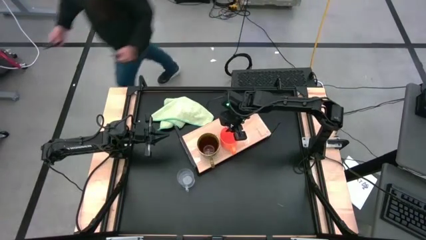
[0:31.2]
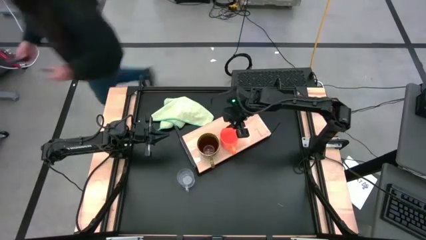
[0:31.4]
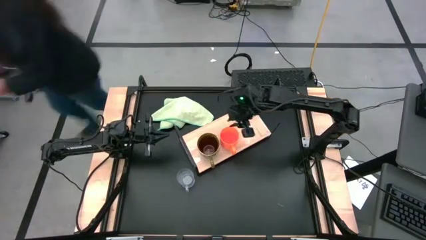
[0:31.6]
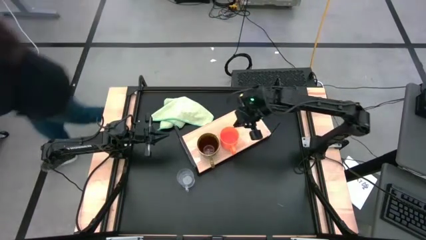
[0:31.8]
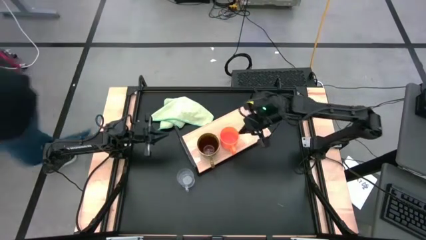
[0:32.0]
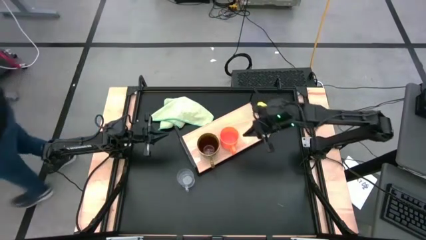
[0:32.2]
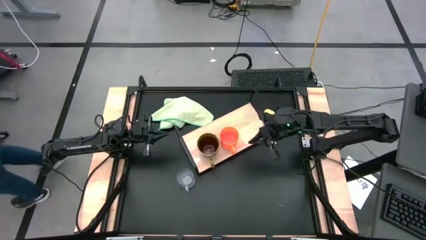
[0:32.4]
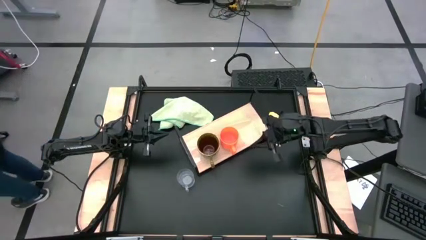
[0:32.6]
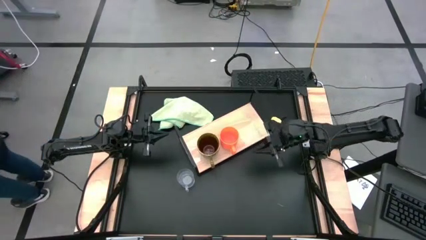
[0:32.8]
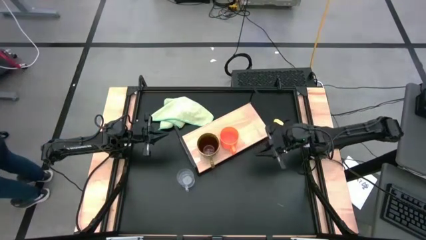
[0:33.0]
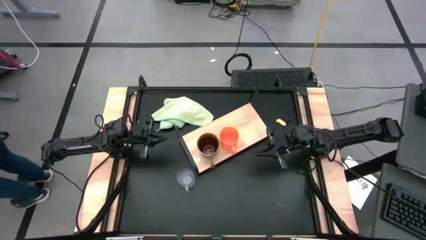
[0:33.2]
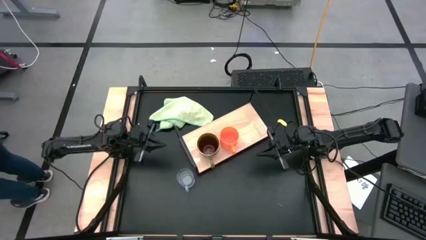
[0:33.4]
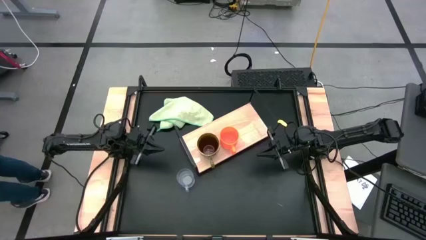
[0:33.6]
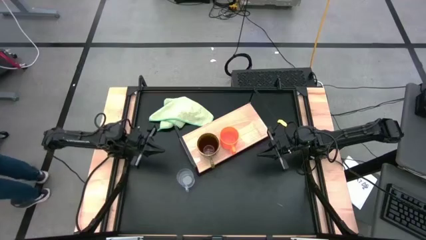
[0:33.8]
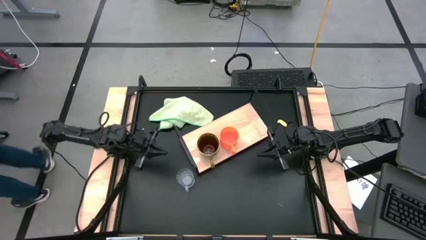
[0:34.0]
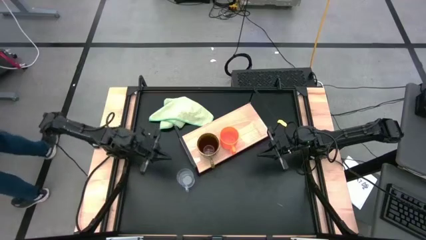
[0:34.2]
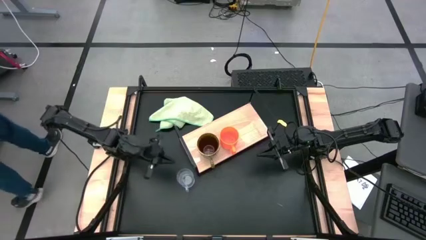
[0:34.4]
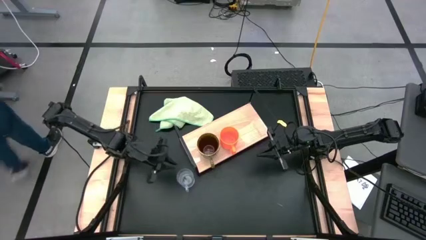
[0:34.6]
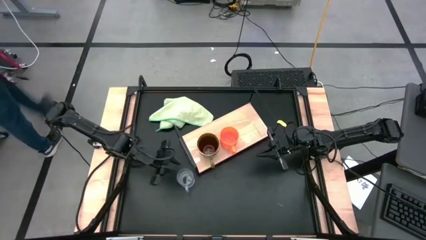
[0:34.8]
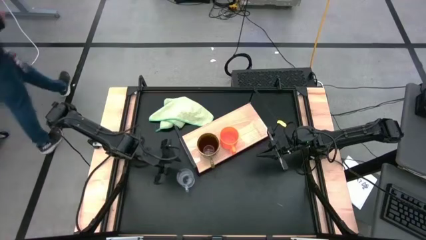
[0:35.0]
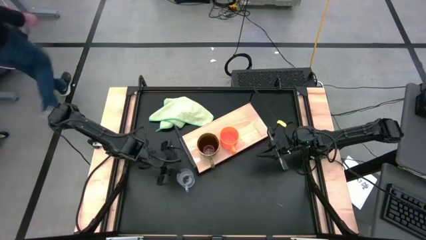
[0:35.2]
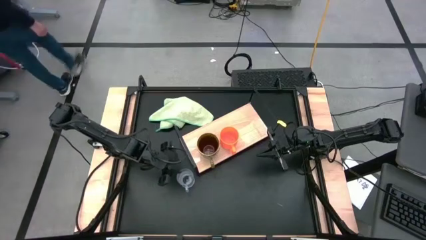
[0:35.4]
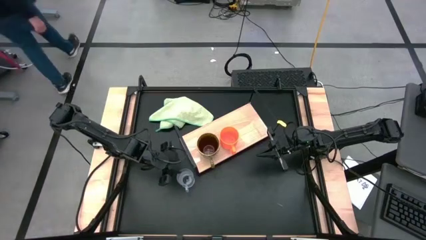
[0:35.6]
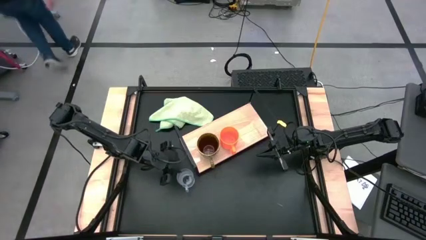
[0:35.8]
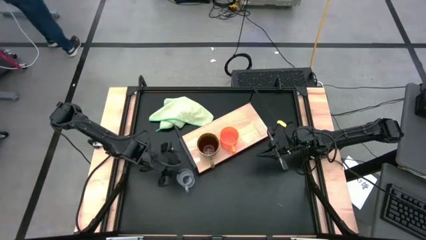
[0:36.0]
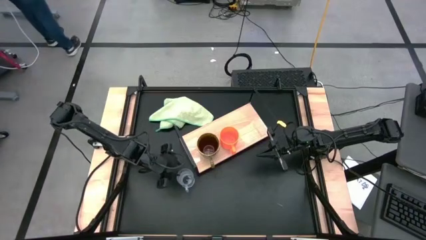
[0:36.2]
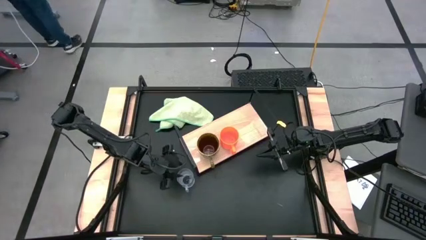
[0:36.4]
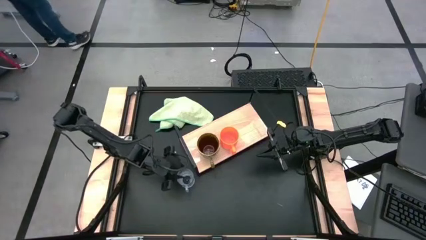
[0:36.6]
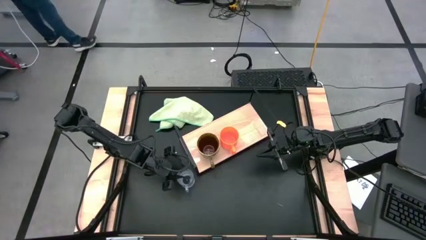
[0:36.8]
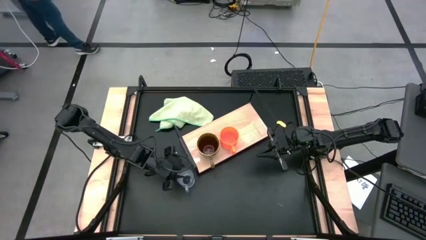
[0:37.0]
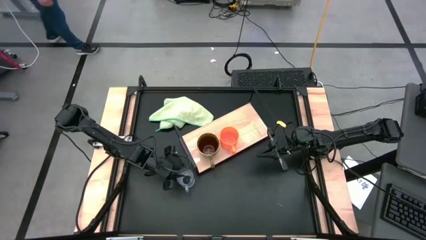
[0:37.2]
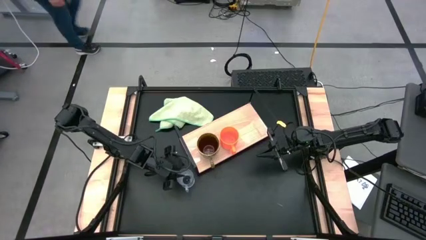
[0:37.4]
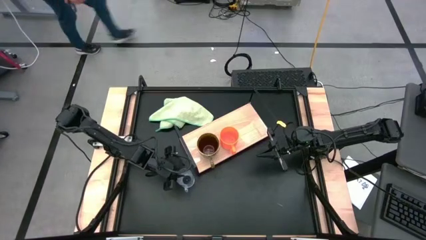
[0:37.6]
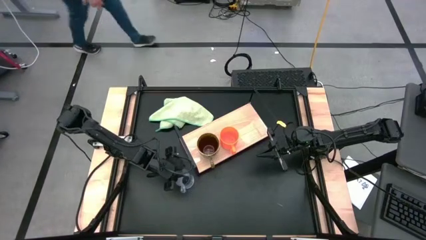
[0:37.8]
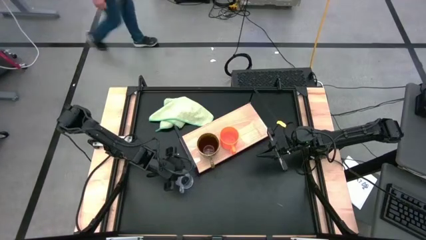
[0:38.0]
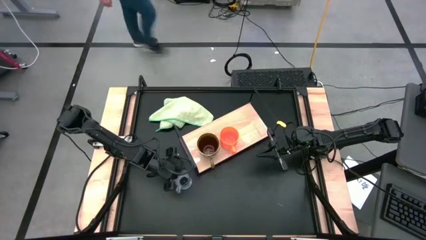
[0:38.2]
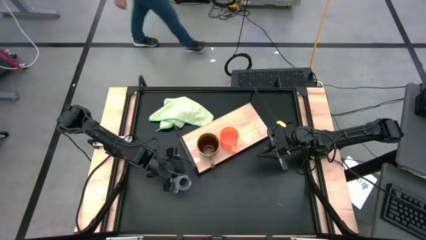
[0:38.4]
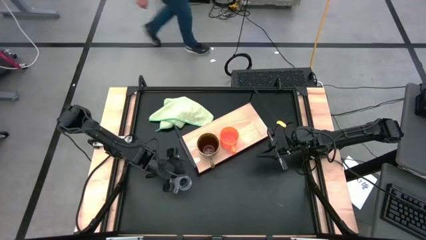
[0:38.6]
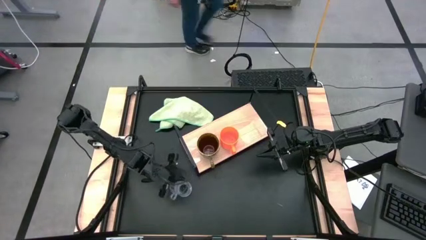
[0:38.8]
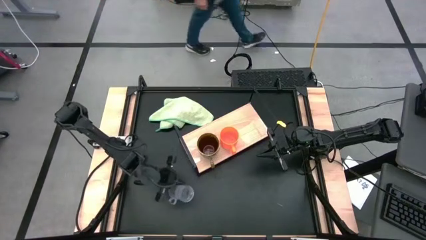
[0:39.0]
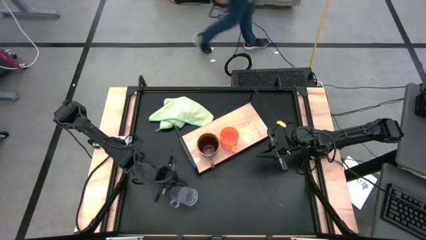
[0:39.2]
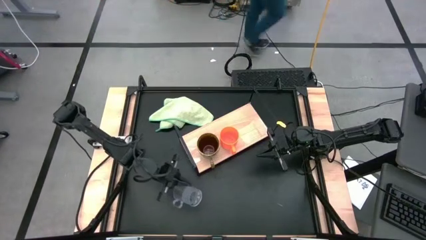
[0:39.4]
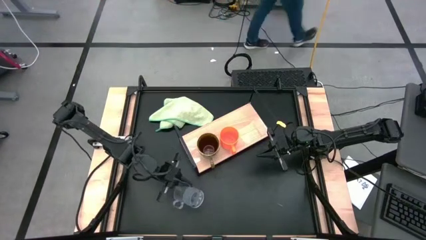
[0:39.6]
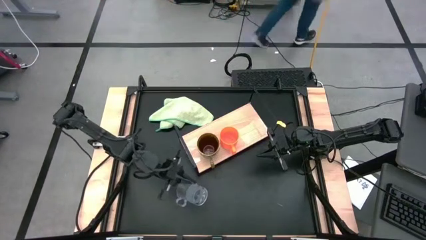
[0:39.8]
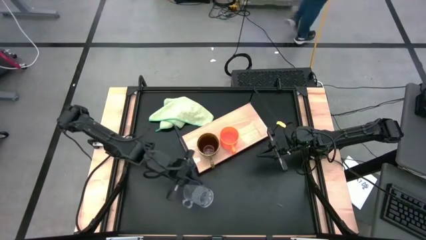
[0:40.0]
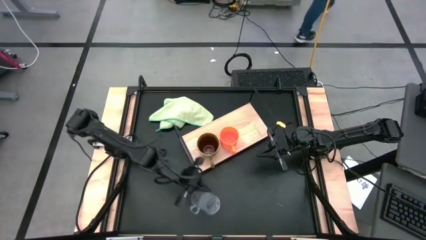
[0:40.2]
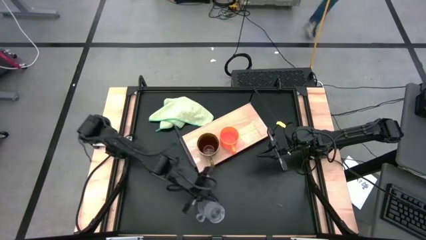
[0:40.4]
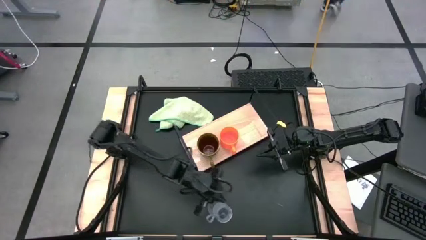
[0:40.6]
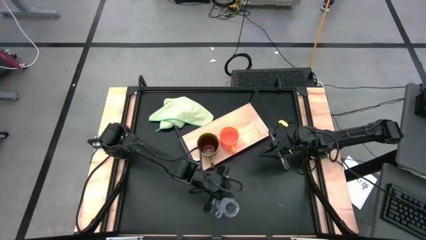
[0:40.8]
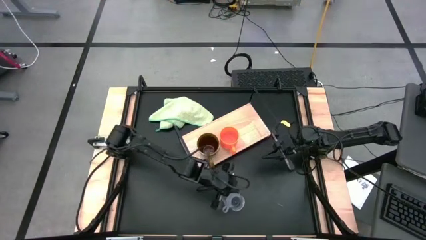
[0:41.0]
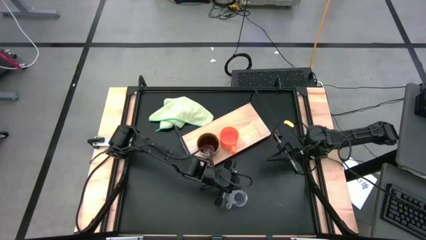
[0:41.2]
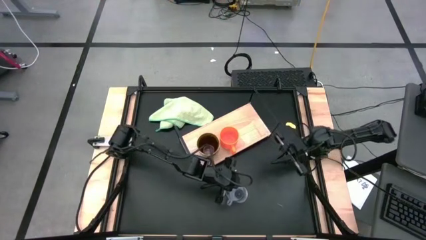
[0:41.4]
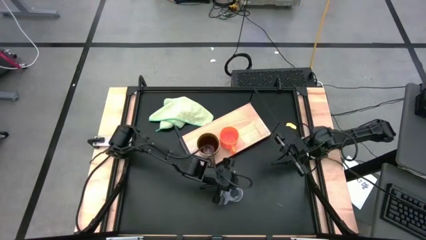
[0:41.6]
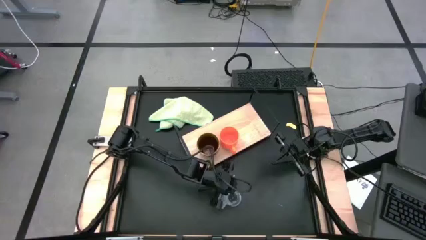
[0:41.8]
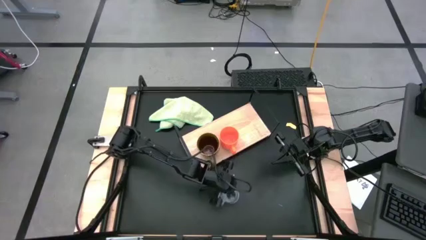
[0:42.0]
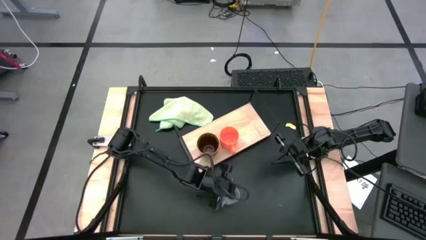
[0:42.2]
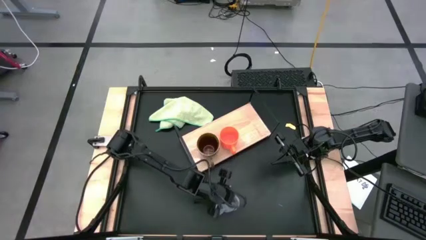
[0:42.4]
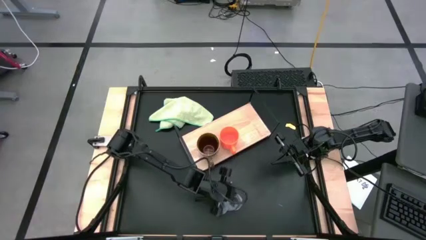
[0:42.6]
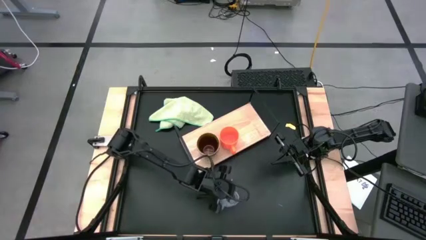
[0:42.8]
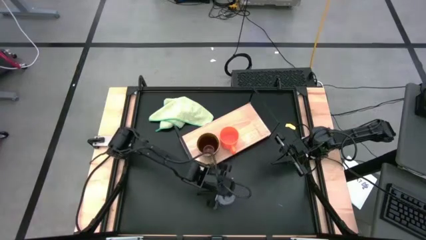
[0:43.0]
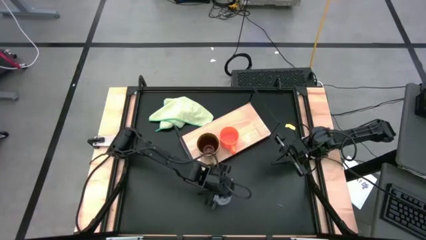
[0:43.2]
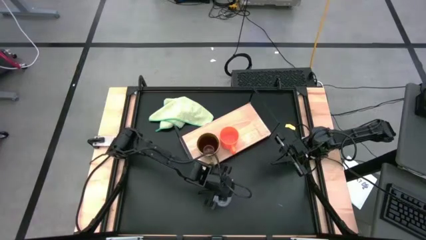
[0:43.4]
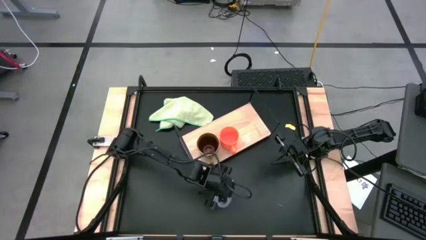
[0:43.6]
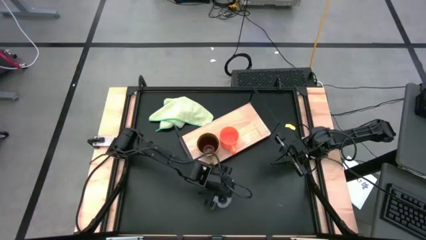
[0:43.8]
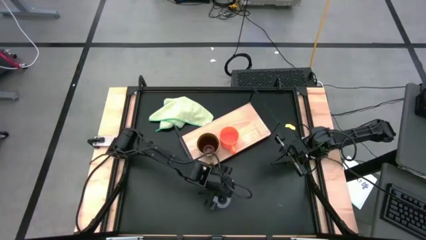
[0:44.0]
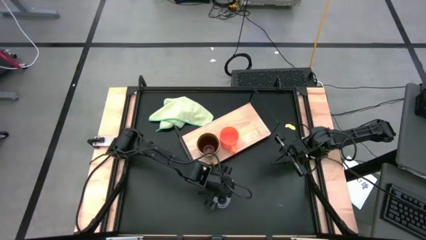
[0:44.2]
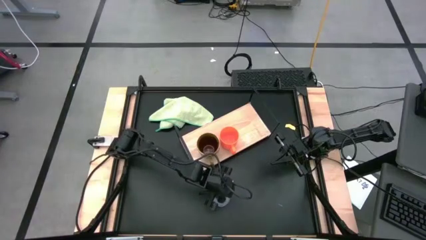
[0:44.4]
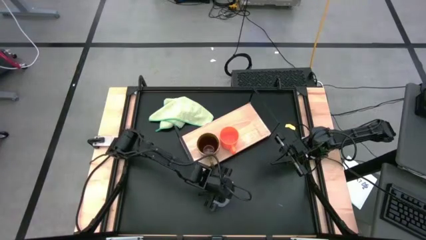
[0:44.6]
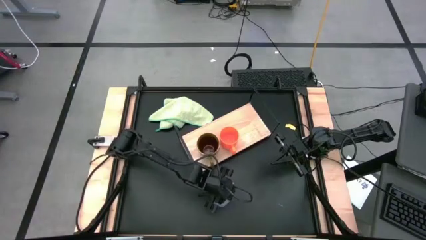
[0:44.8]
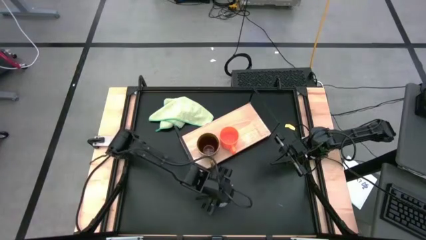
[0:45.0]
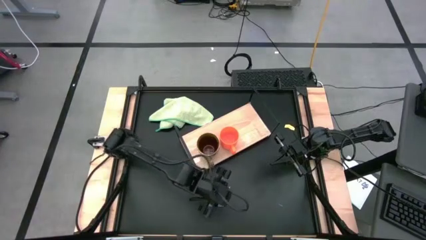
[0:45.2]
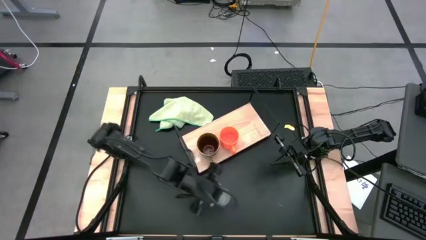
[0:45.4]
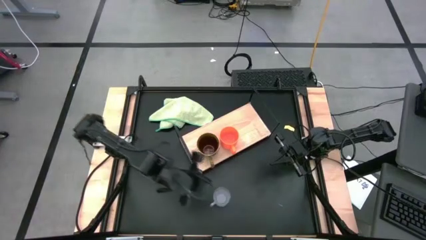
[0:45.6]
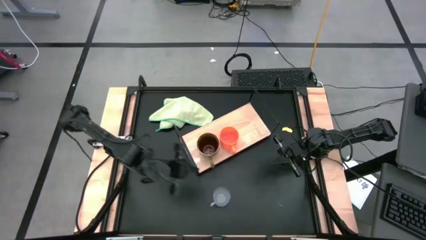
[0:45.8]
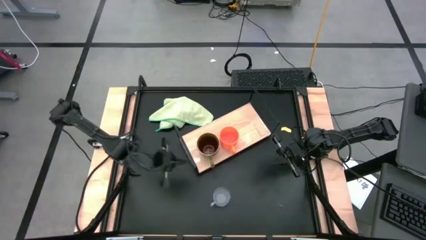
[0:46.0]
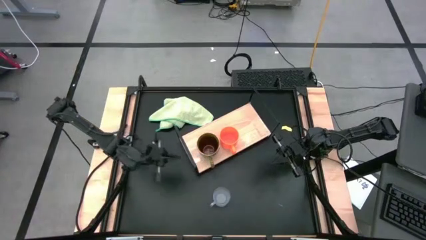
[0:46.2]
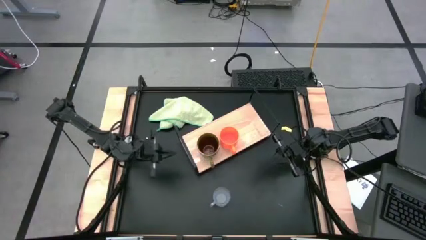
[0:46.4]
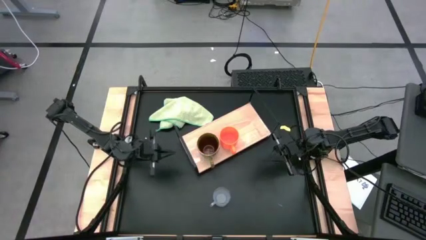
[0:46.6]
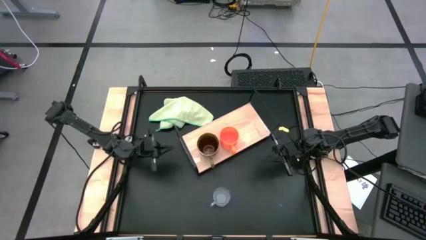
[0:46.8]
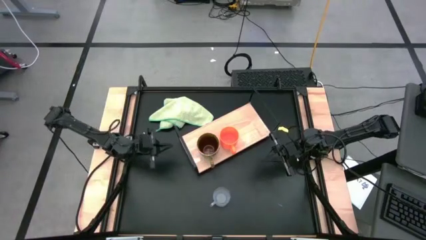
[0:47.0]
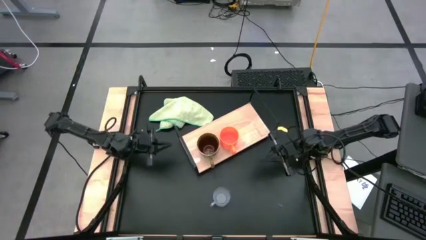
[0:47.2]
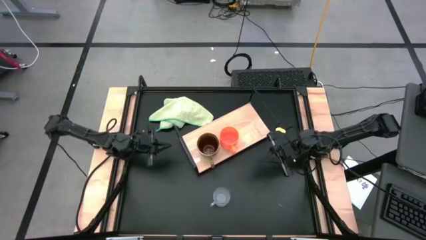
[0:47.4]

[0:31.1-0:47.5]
Task: Stack small to large cups/mugs on shelf
Put the transparent mug on the shelf
